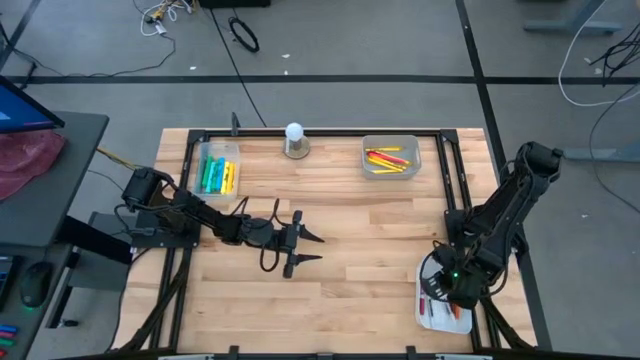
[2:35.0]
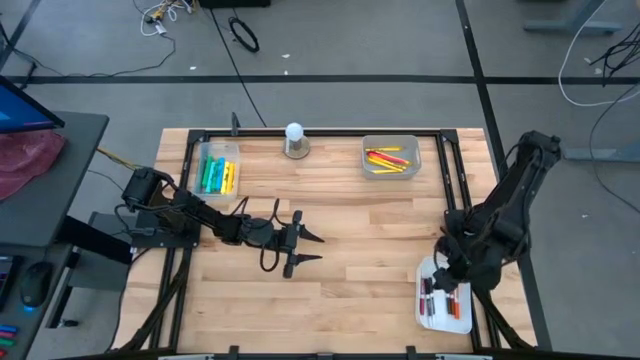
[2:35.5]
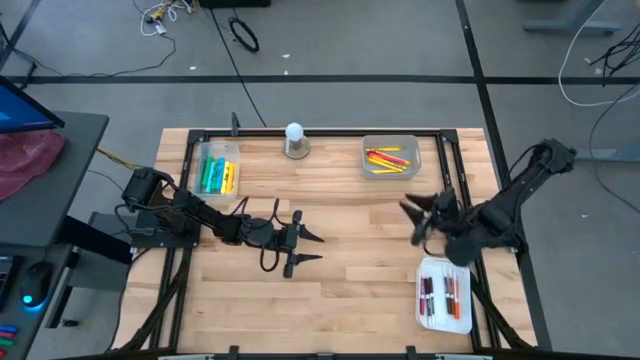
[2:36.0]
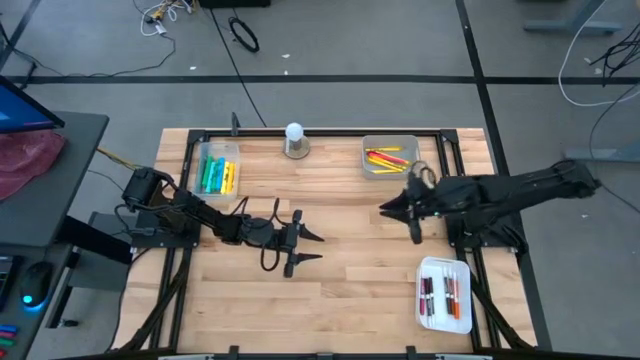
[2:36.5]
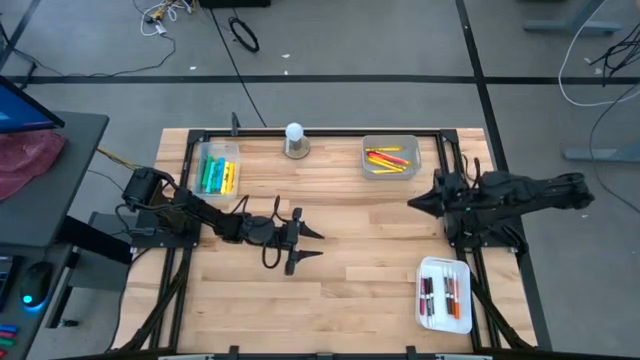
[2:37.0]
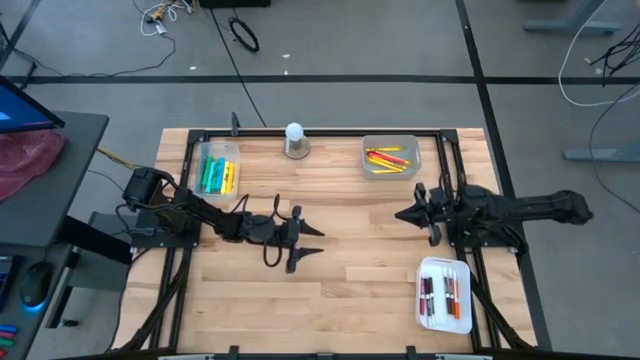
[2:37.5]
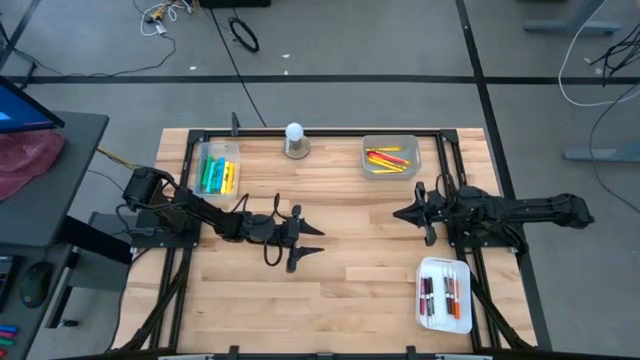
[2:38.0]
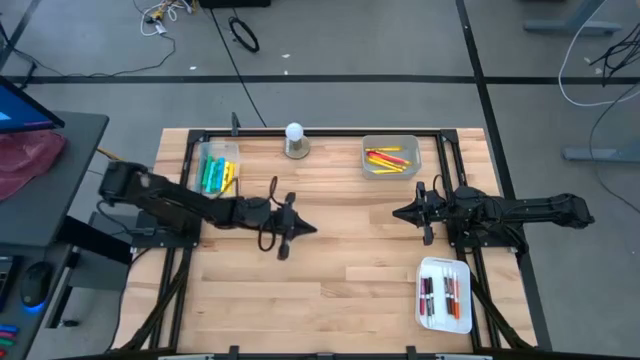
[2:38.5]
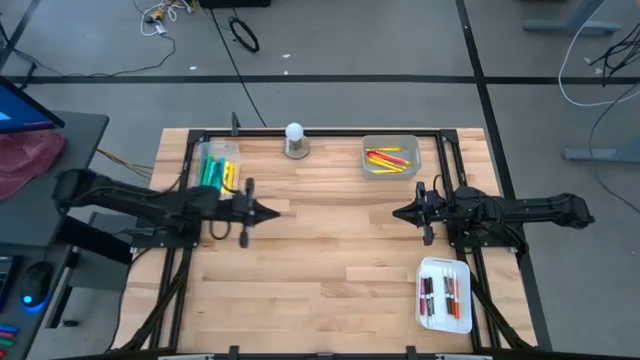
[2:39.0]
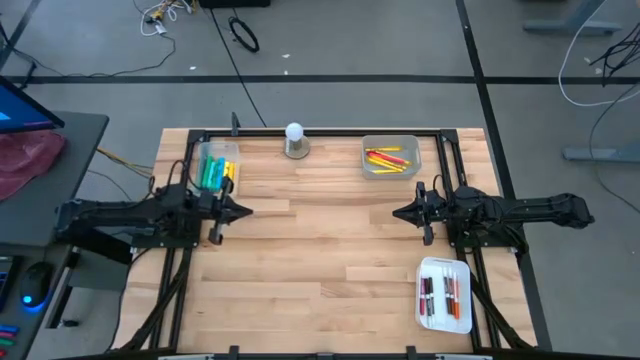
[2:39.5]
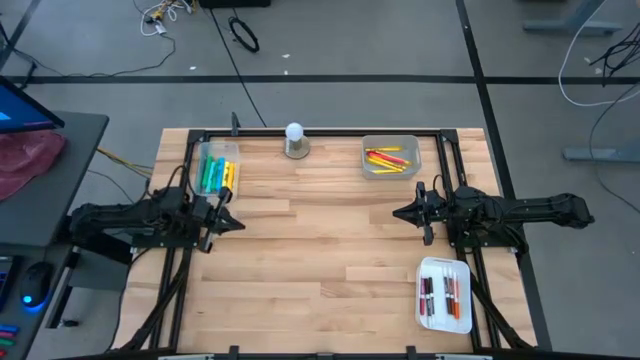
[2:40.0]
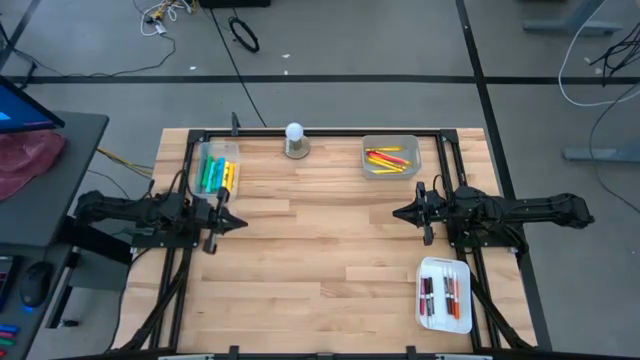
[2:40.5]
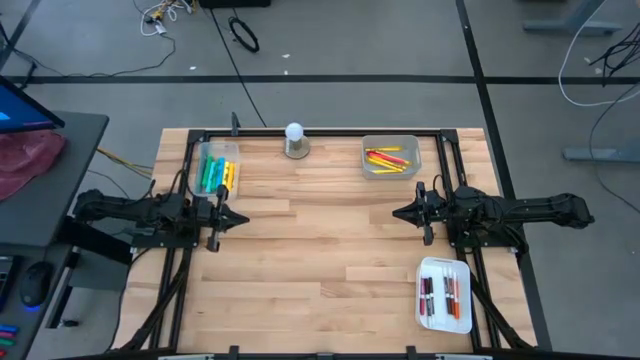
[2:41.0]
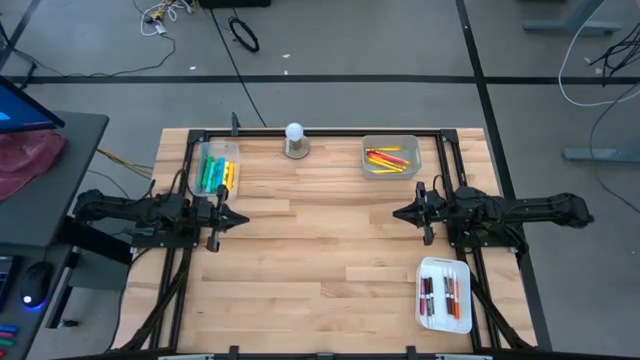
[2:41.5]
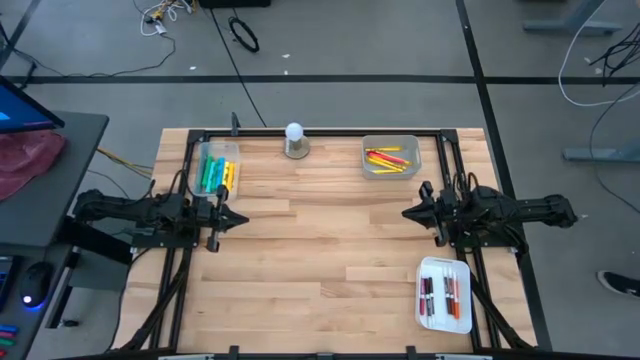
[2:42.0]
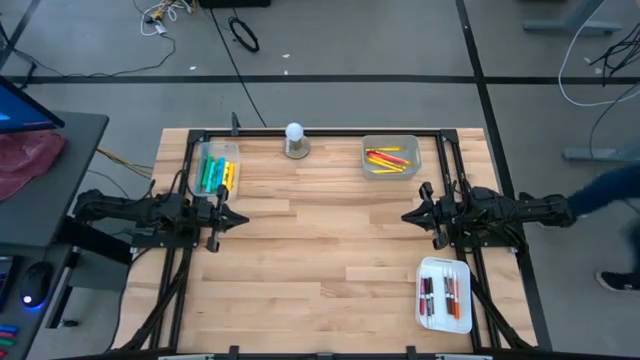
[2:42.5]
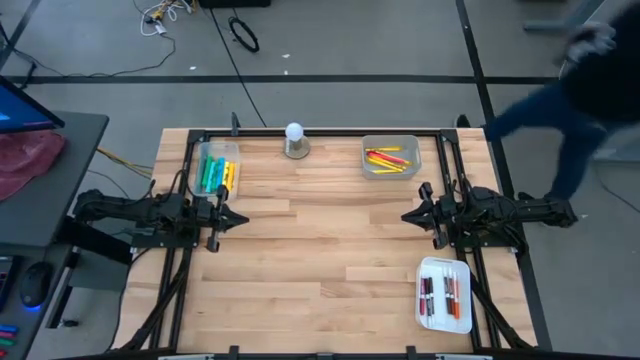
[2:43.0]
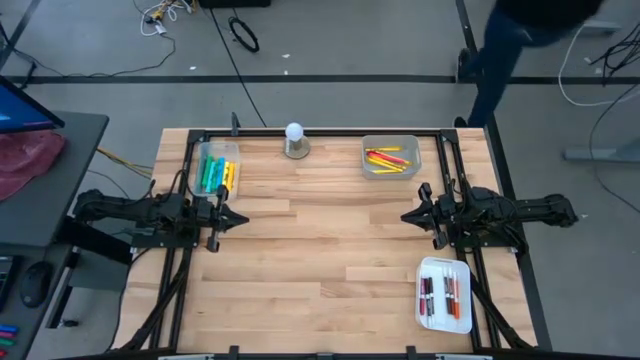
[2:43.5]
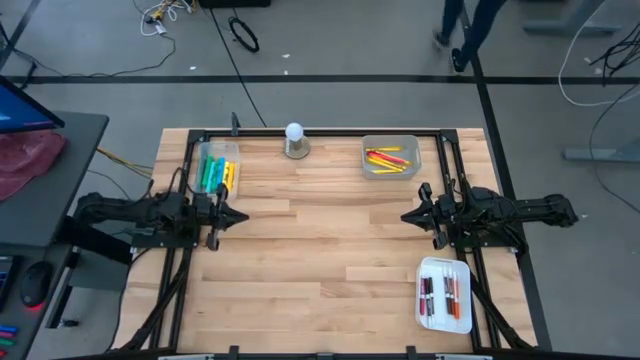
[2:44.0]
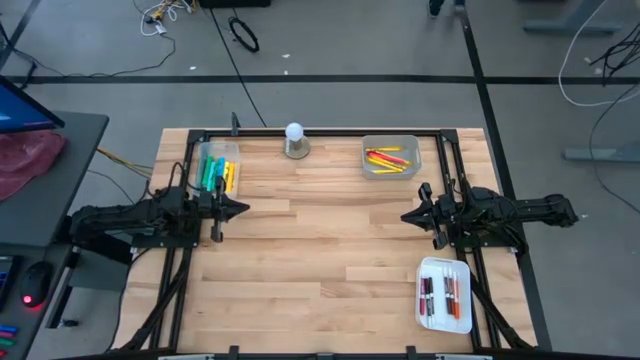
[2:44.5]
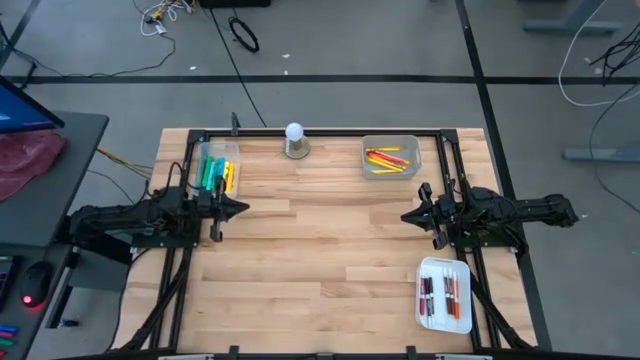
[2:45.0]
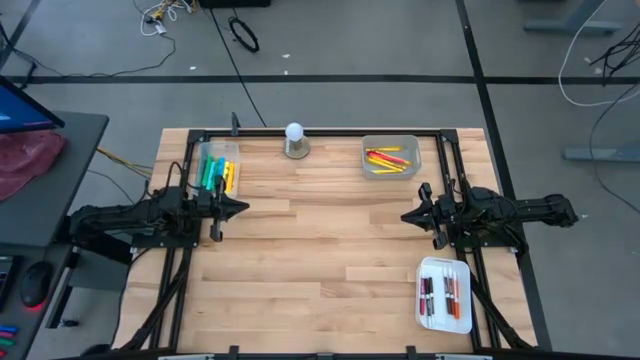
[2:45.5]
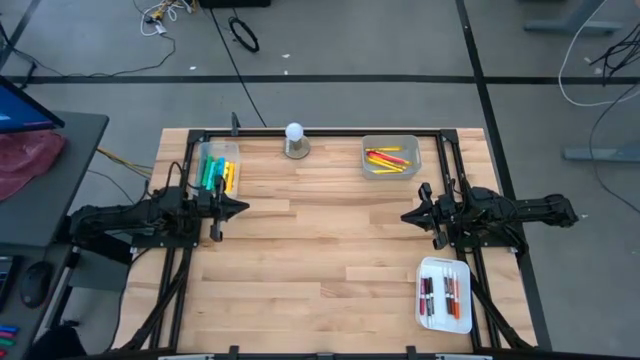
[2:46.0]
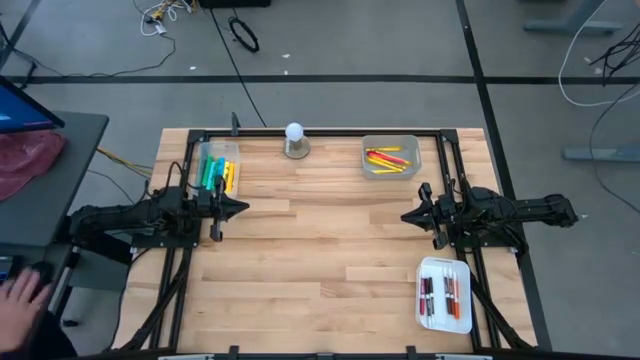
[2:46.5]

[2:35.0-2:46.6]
Task: Pick & Place Markers
Return to Home Position

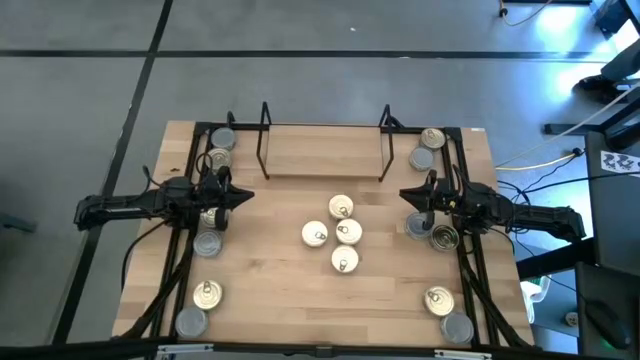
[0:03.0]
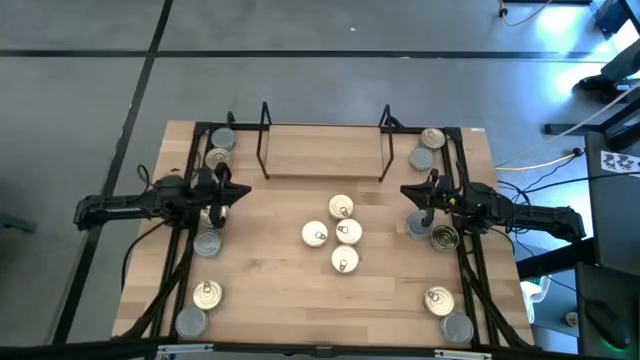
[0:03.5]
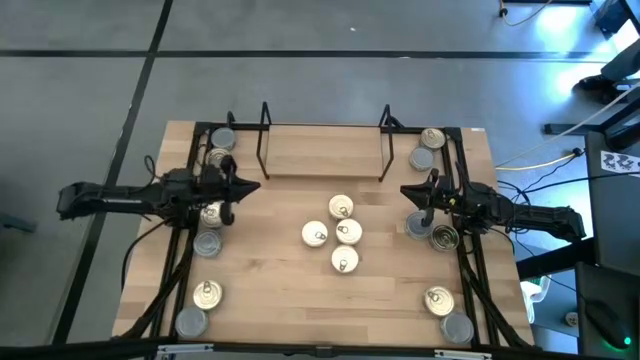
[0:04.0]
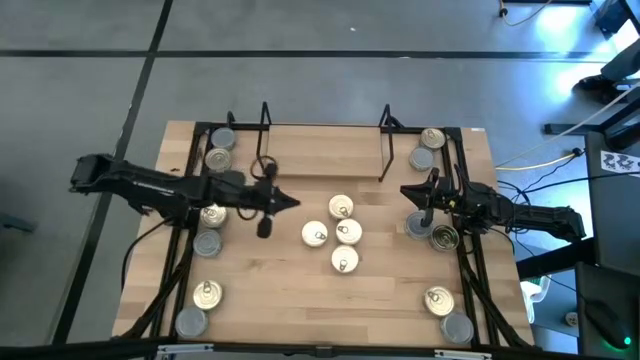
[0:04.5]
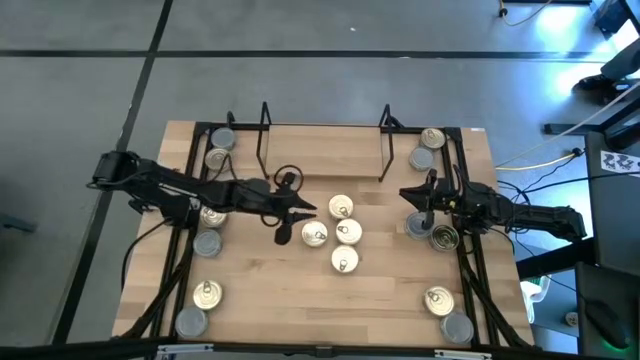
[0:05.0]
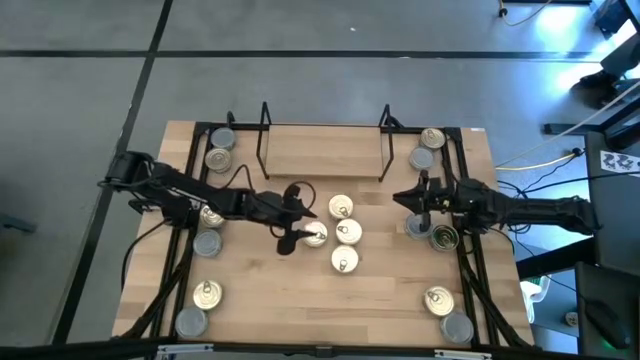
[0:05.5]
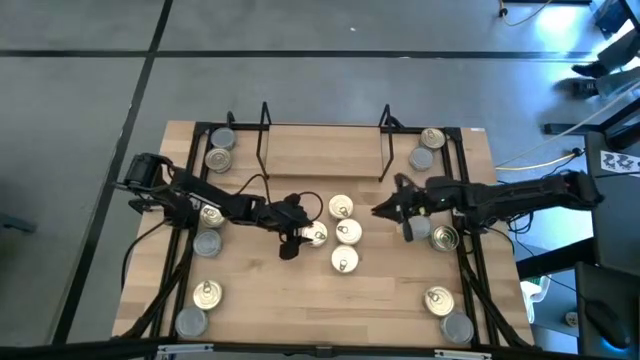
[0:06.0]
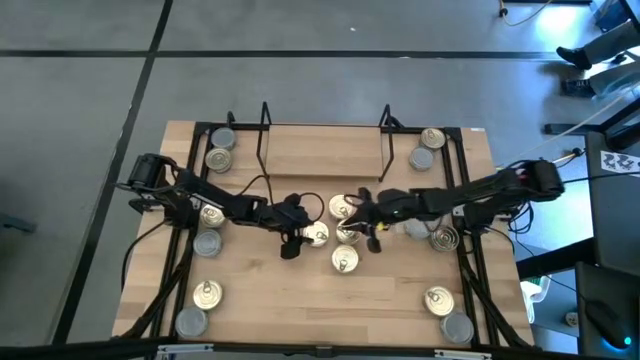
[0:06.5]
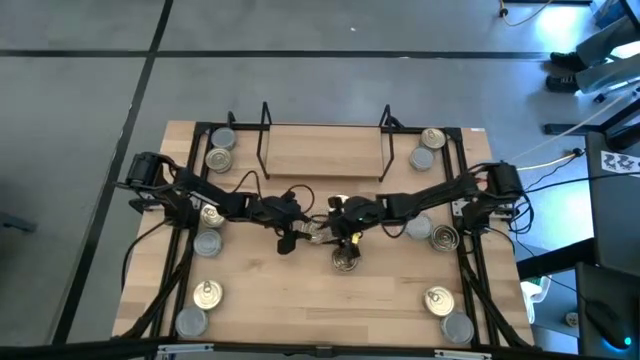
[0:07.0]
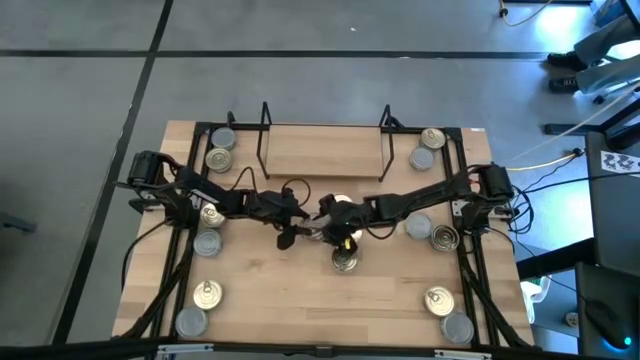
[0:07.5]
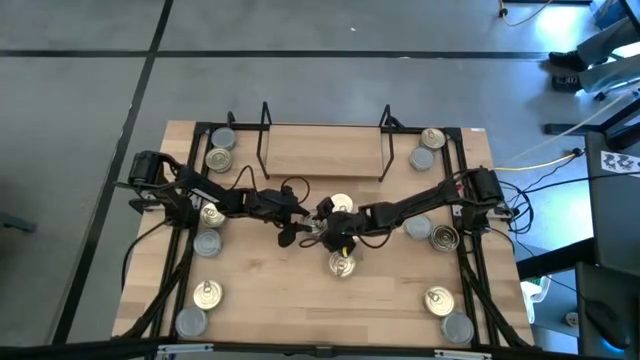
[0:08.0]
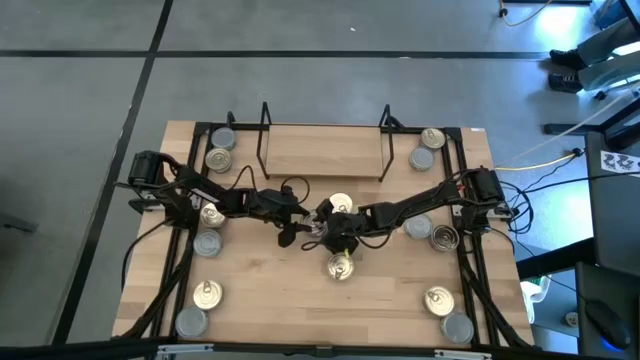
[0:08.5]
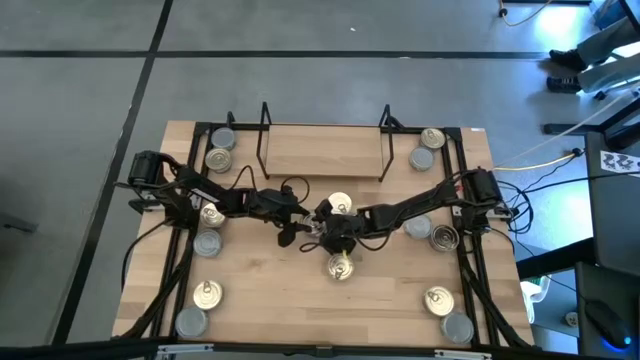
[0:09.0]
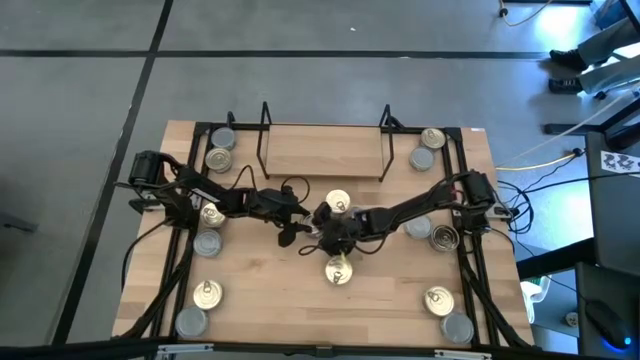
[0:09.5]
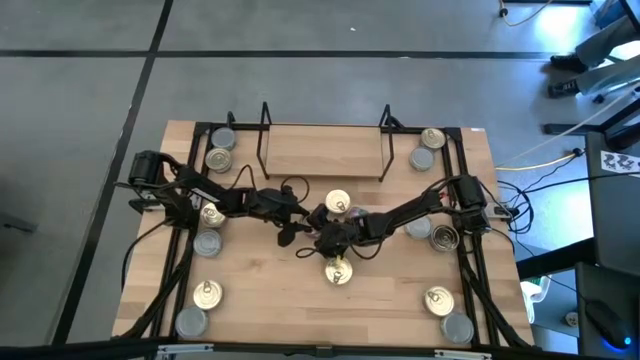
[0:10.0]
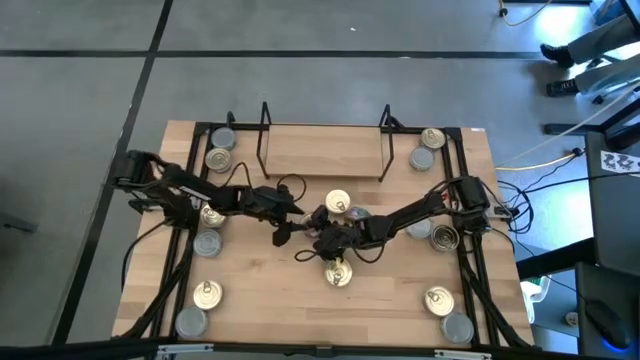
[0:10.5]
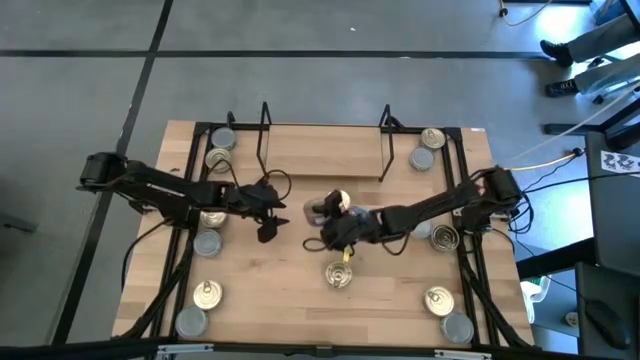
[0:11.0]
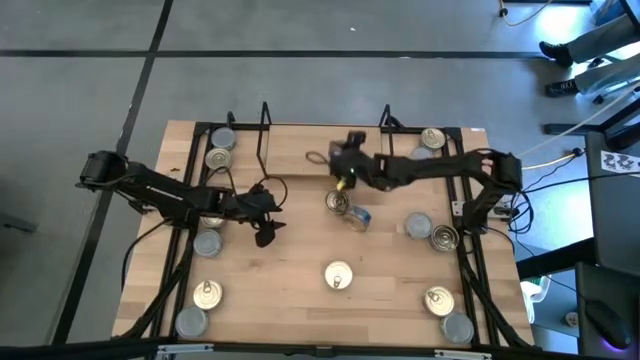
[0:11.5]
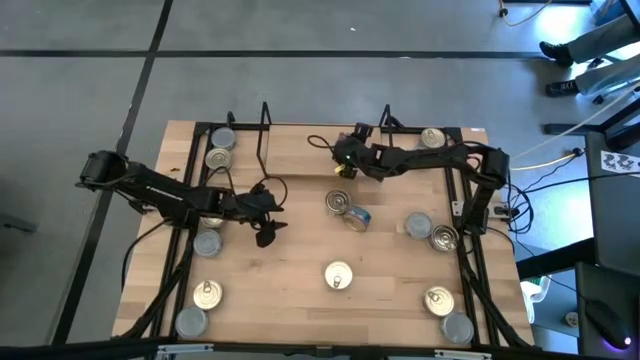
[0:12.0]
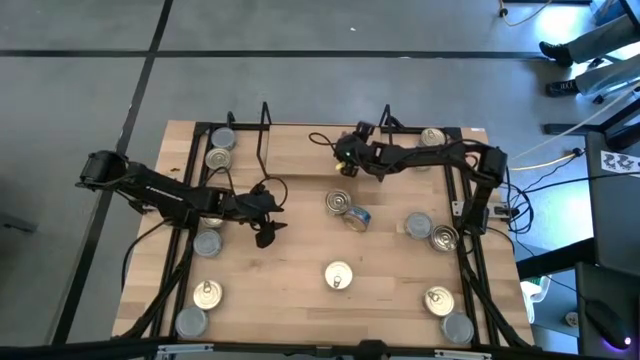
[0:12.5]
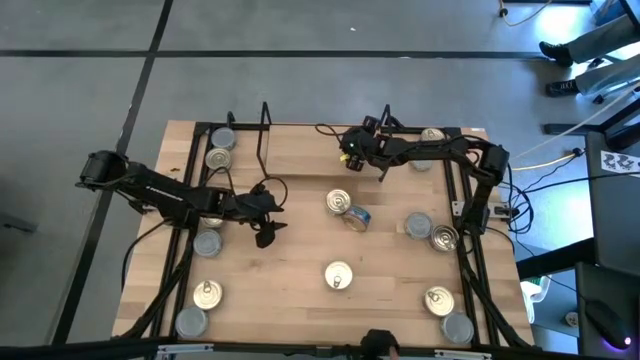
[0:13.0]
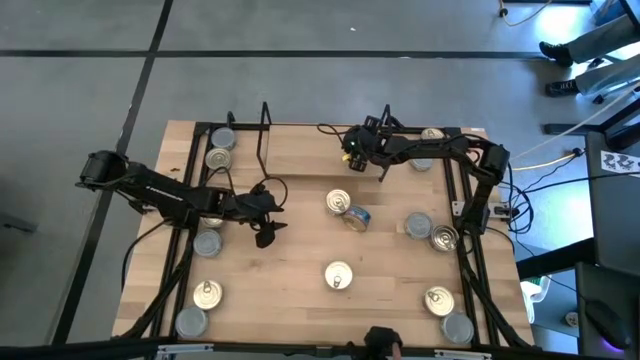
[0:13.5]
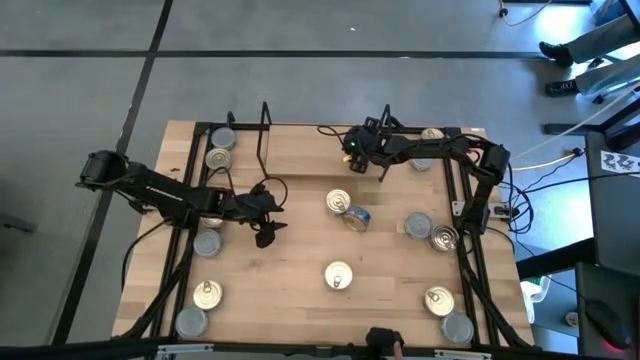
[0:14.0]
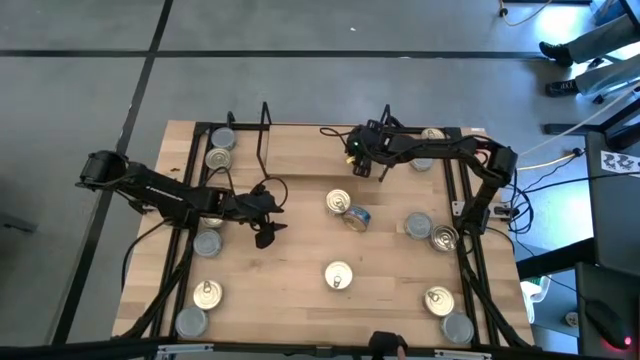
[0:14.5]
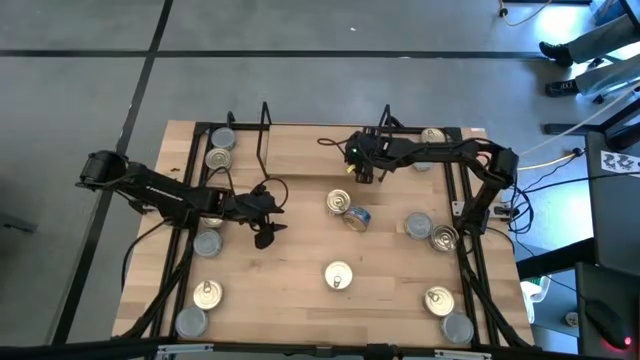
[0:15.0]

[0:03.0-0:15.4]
Task: Stack canned seafood by type on shelf
Put the blue-pink tuna can on the shelf
